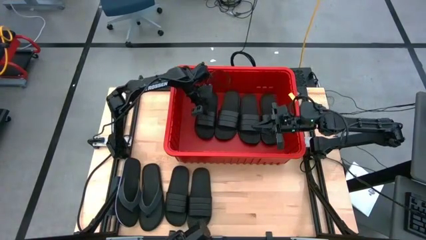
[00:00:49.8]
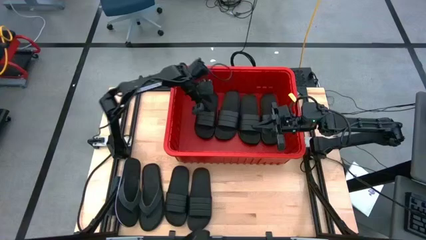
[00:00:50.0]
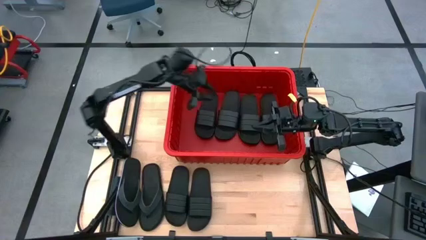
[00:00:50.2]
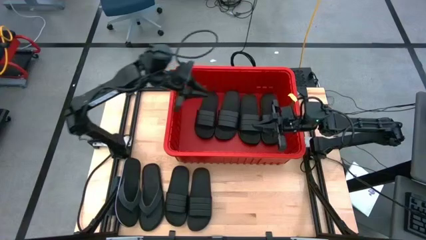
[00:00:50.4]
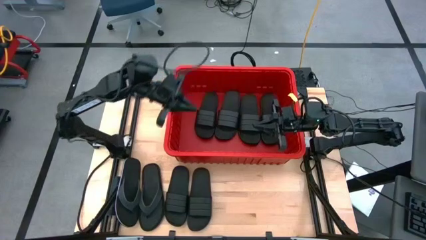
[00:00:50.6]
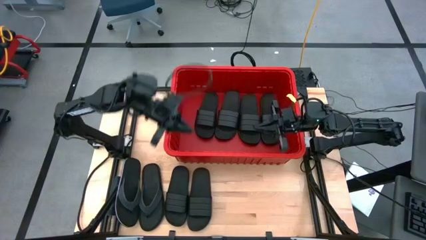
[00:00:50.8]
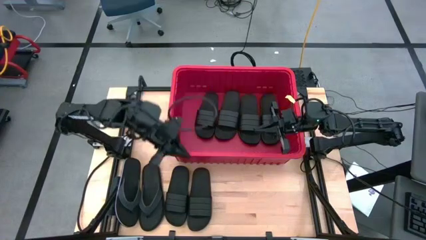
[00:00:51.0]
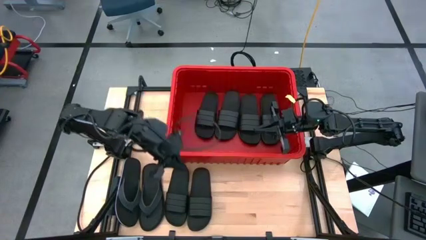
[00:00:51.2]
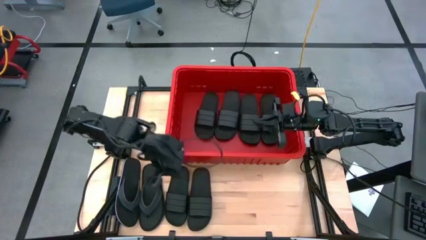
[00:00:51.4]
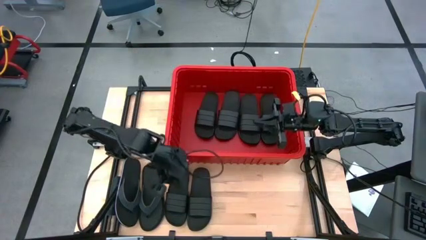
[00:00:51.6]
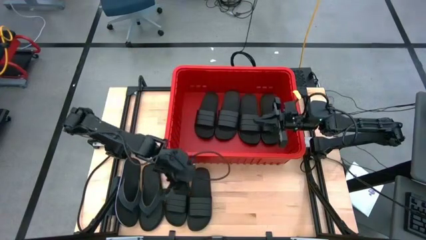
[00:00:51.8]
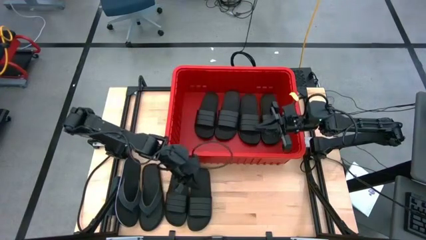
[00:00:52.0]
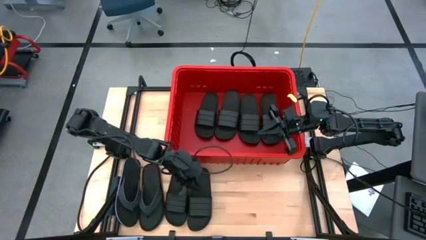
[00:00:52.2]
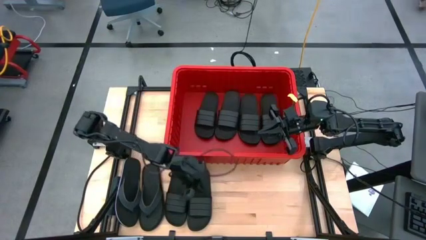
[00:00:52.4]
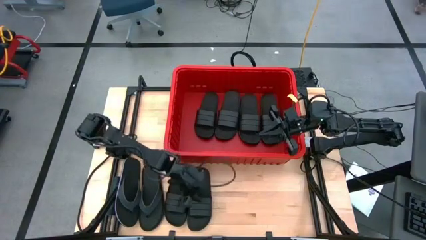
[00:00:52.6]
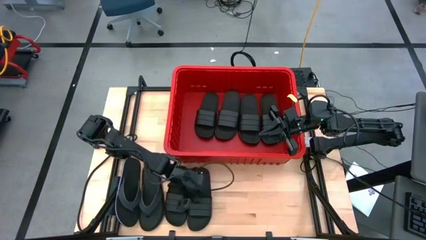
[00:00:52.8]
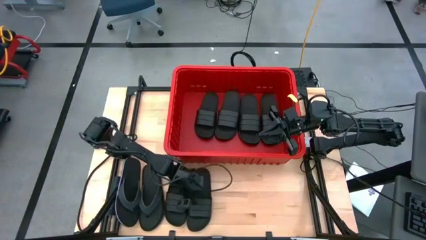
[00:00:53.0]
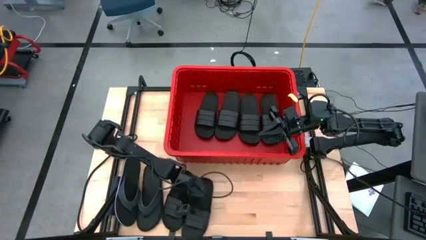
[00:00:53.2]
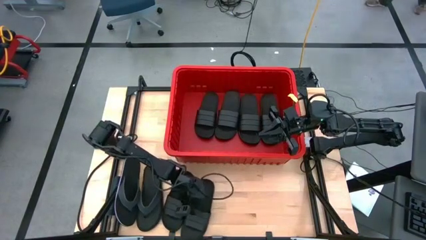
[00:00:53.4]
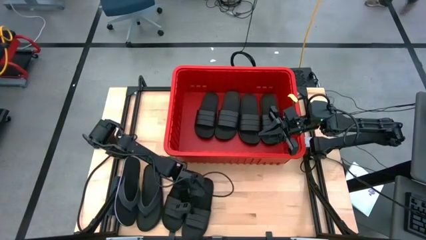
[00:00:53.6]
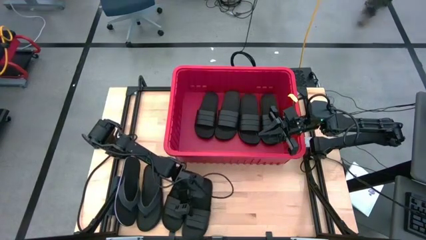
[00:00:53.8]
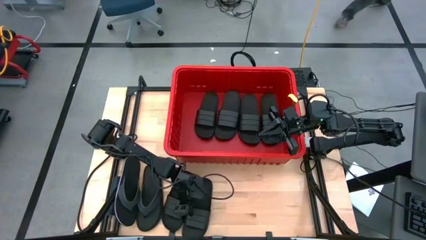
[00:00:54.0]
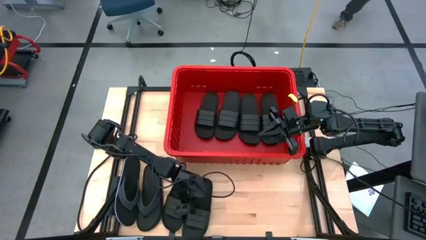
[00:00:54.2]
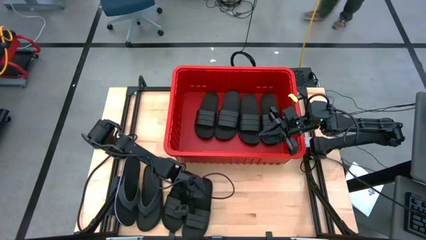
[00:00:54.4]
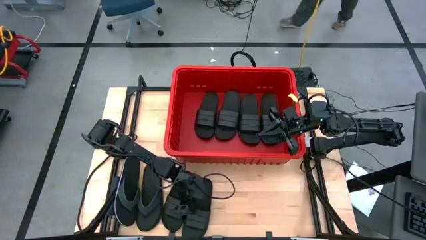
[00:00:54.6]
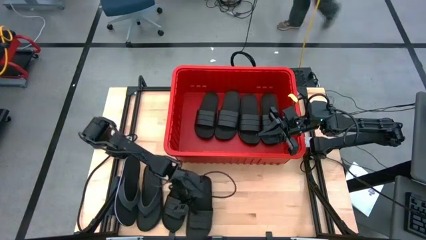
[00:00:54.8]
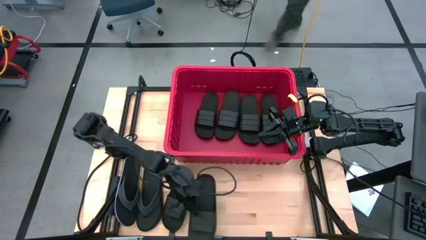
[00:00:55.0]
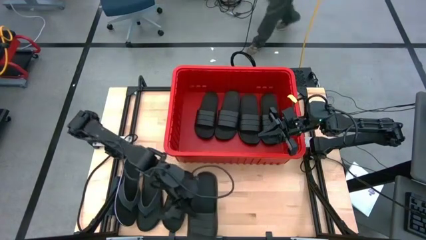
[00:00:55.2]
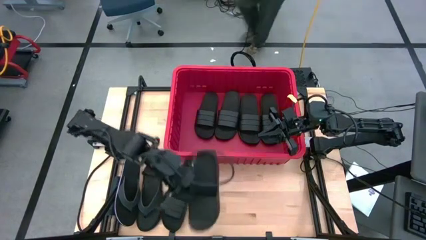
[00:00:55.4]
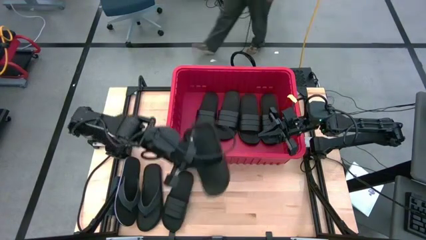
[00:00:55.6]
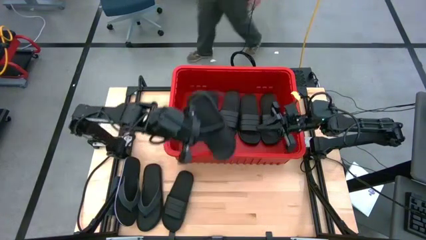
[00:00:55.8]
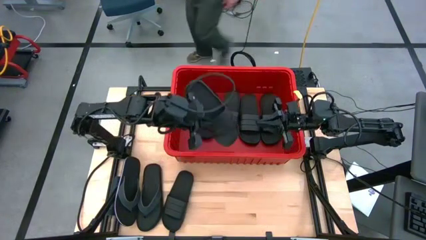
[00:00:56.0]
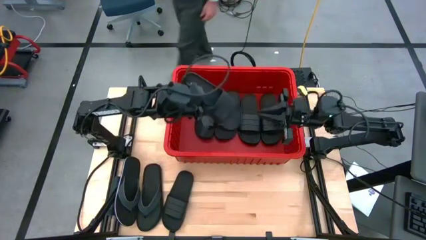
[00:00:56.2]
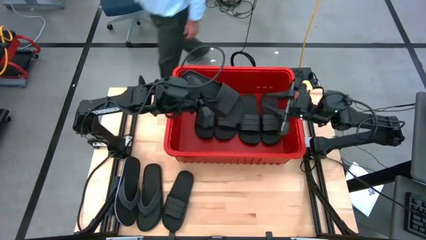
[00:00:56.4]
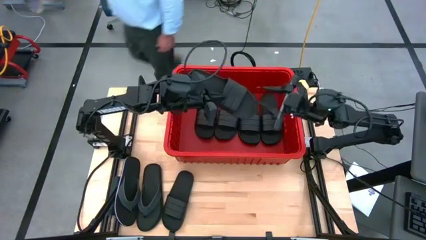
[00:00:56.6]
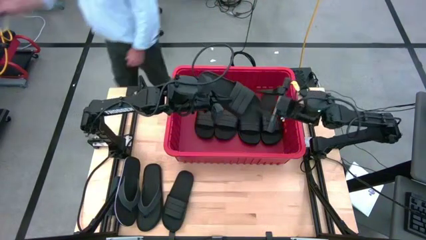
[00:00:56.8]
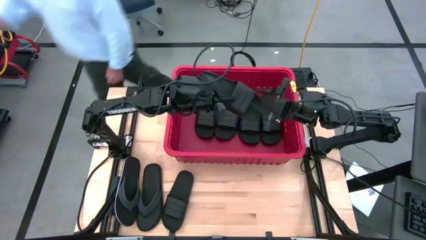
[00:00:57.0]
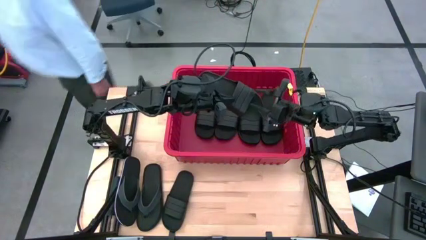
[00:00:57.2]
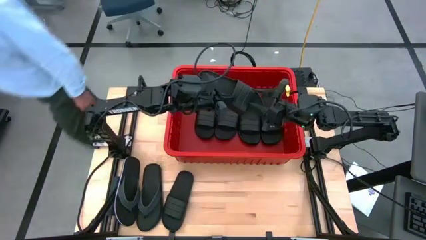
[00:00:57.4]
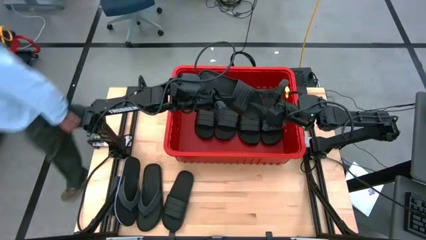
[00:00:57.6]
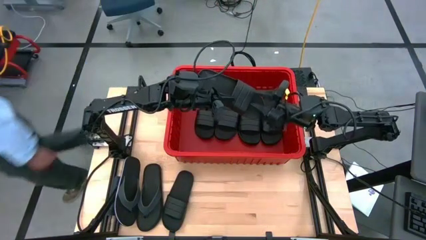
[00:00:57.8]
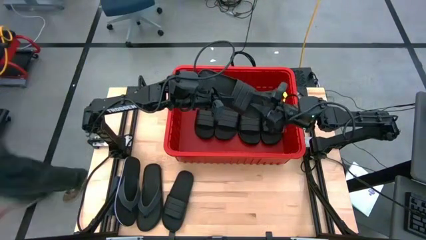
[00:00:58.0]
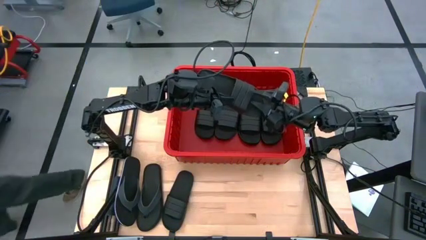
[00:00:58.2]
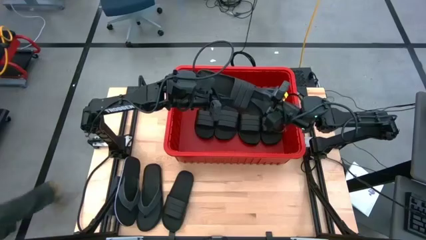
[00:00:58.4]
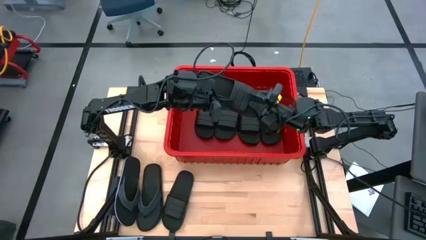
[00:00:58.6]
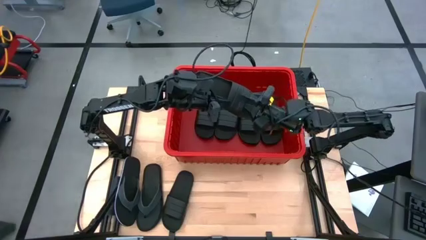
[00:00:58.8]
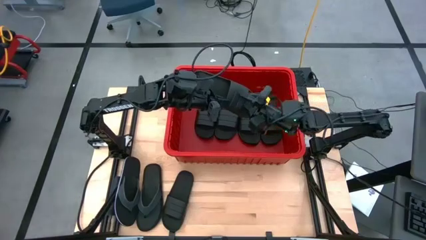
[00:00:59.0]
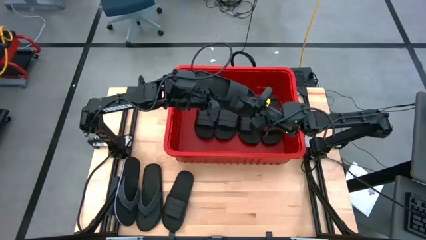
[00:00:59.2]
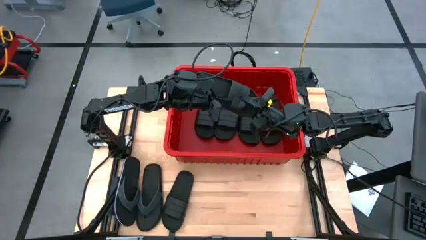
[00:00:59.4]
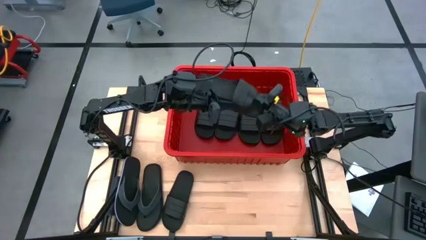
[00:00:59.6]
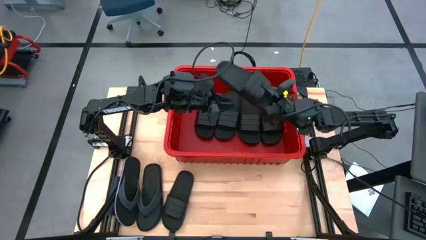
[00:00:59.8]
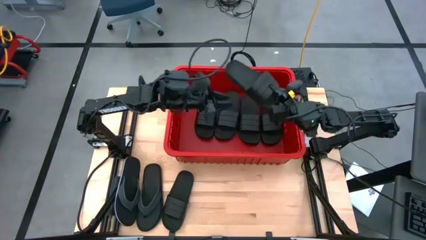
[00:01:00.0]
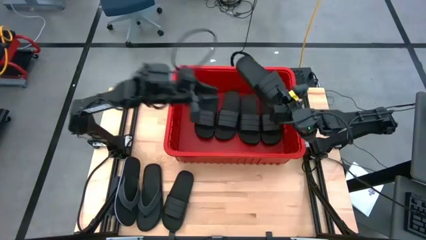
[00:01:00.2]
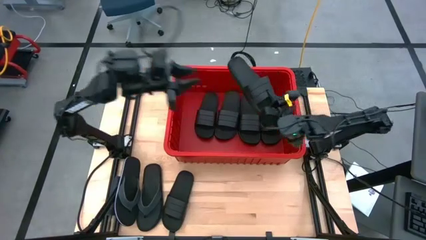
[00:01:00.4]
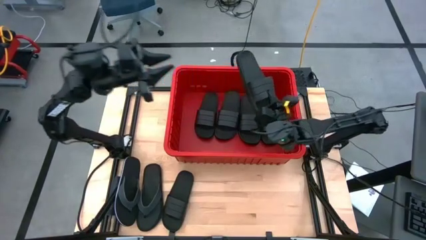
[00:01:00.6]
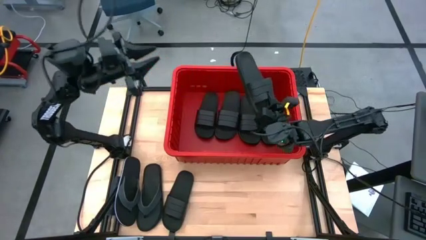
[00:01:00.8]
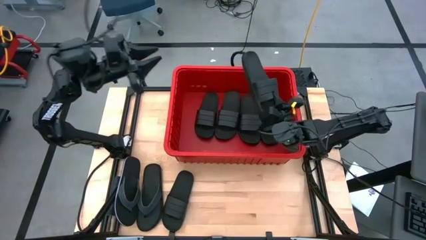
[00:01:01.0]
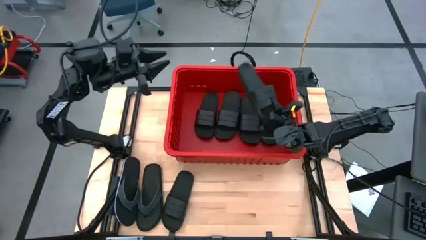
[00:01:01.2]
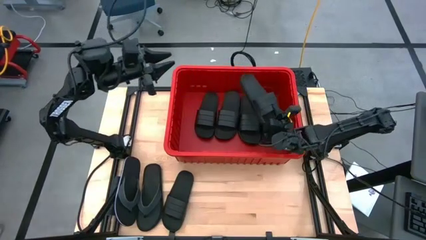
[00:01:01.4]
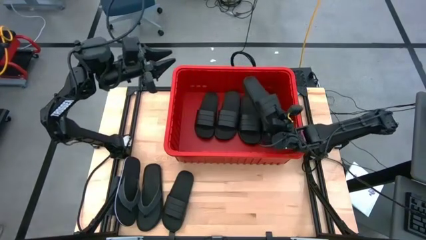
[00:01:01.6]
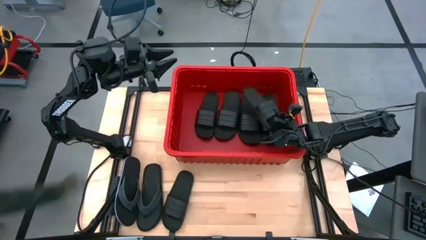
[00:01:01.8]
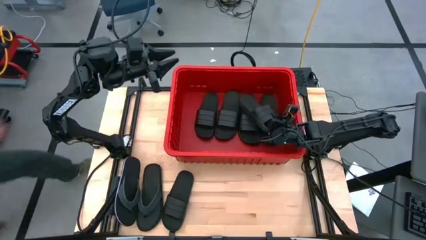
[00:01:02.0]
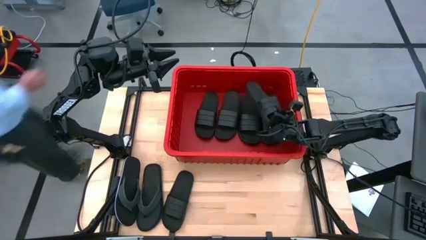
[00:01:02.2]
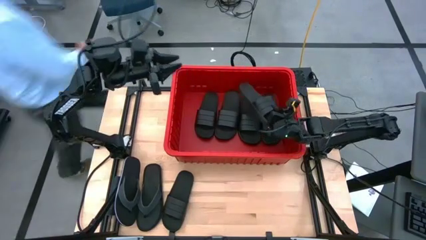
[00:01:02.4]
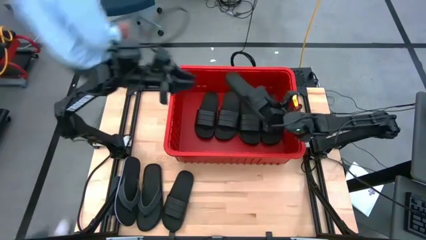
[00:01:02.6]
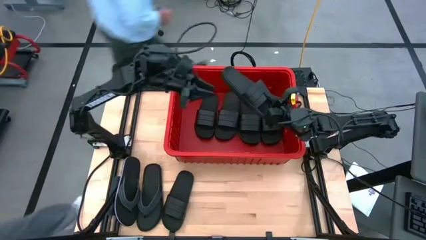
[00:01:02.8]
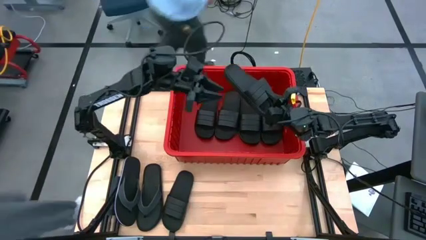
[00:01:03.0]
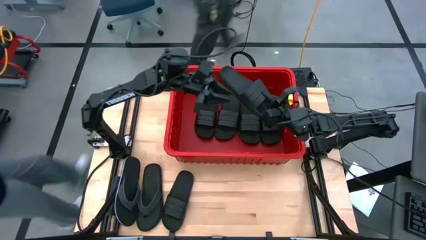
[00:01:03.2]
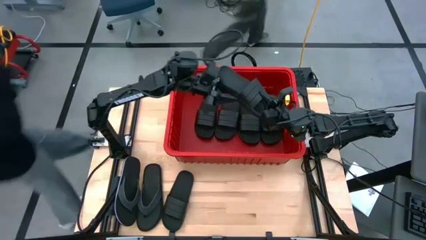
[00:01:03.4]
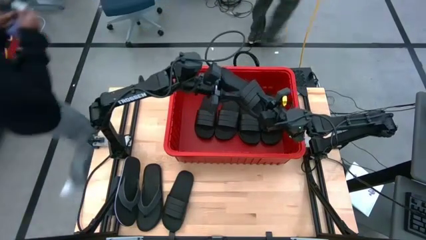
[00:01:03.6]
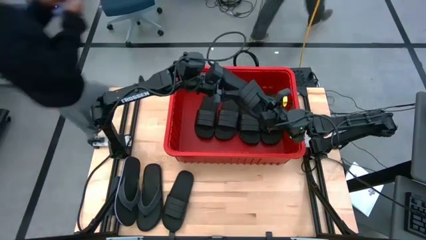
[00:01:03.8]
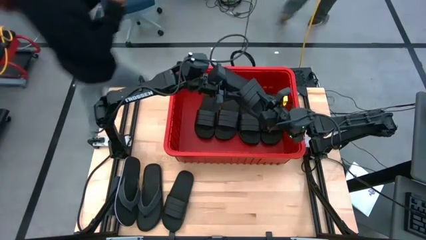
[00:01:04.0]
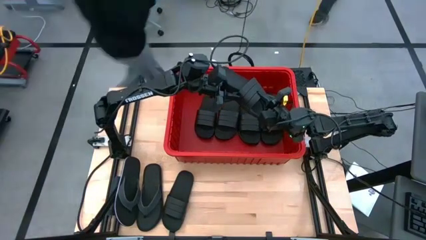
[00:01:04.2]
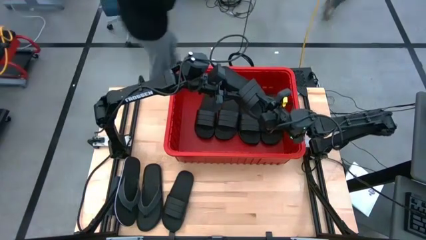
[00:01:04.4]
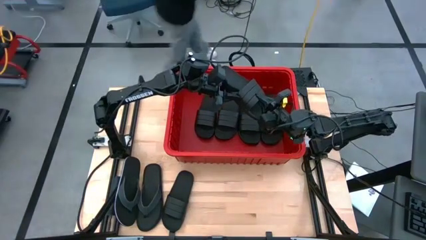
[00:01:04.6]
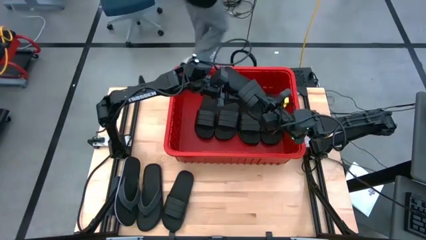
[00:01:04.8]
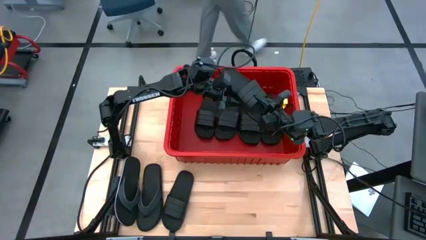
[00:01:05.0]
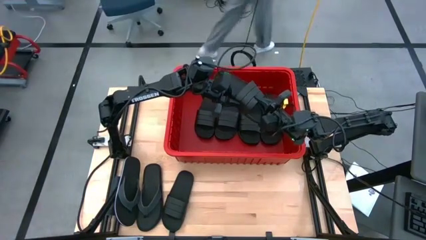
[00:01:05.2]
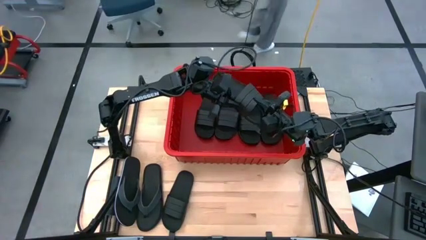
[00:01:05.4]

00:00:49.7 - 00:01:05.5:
Task: Pick and place slides into bin
Put the right black slide on top of the other black slide into the red bin
